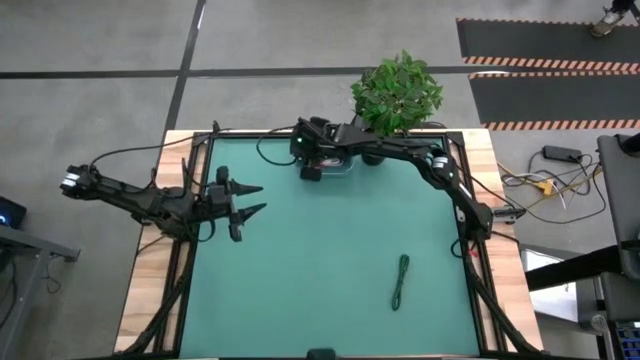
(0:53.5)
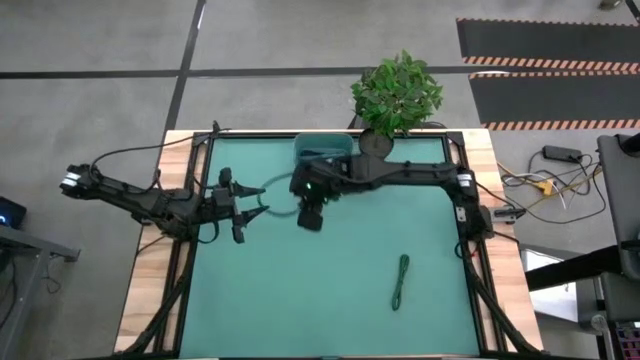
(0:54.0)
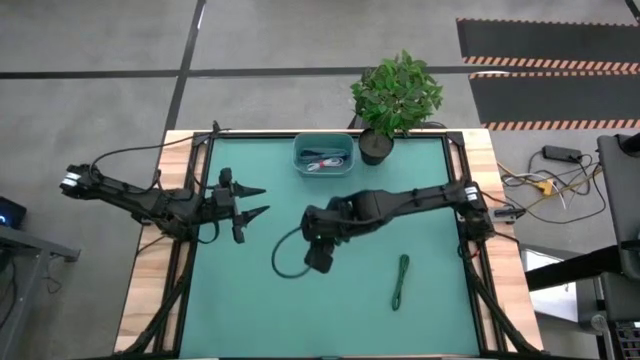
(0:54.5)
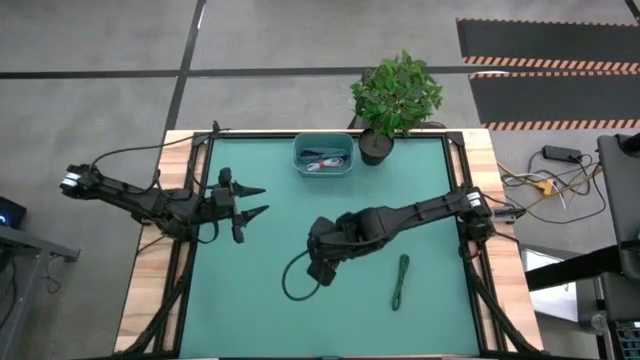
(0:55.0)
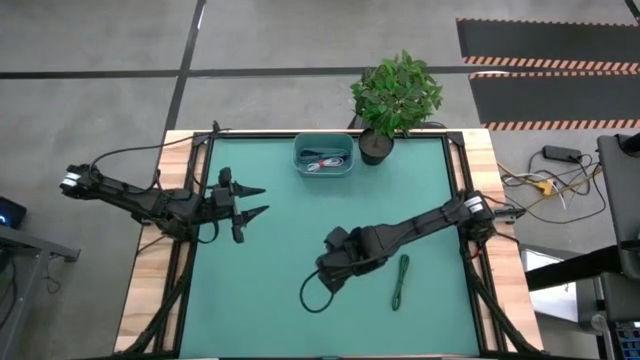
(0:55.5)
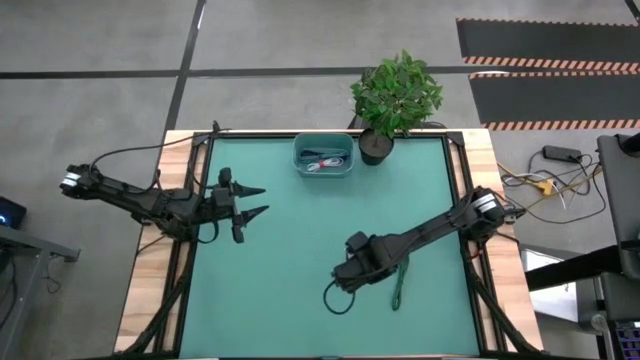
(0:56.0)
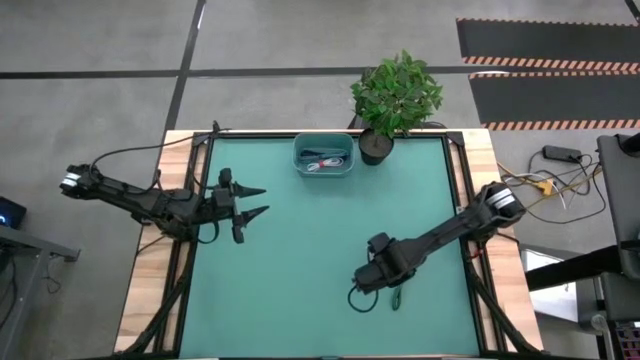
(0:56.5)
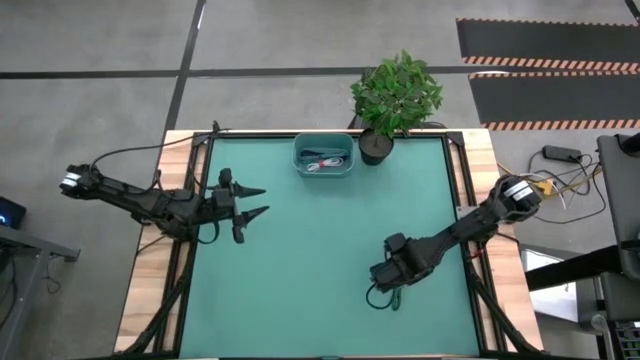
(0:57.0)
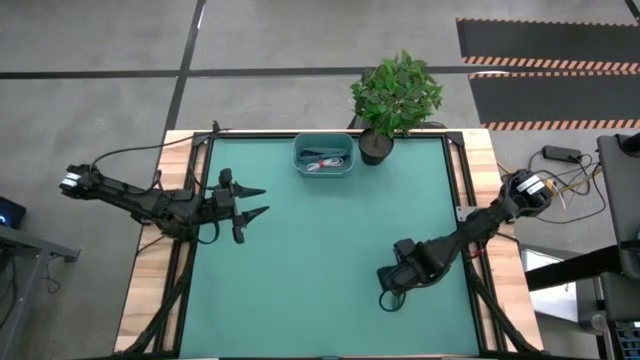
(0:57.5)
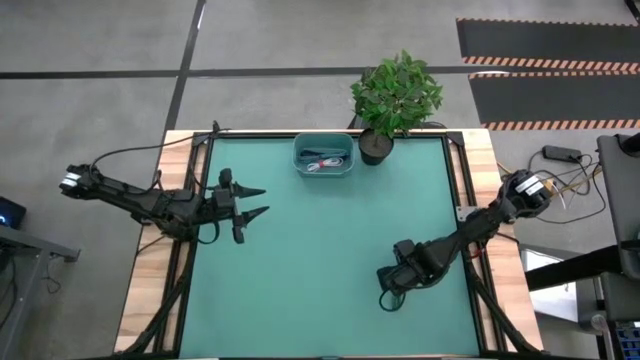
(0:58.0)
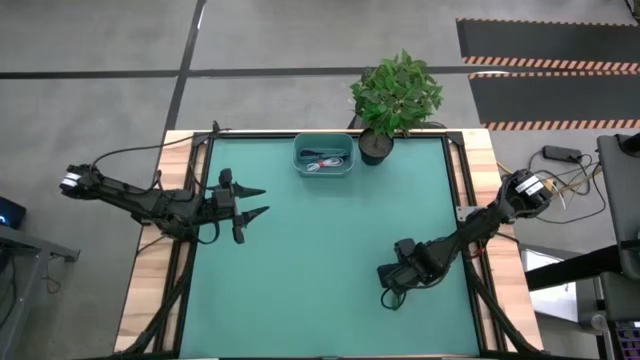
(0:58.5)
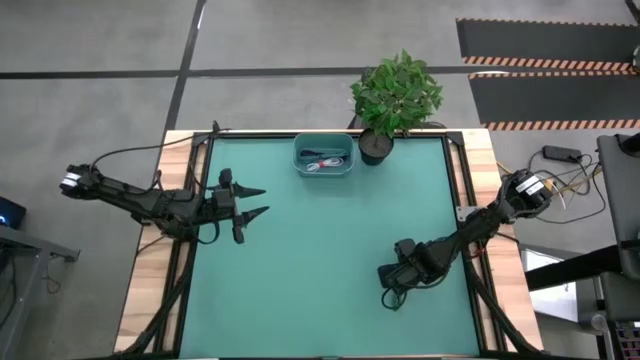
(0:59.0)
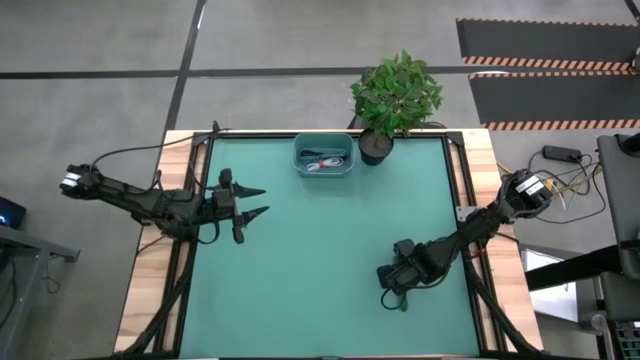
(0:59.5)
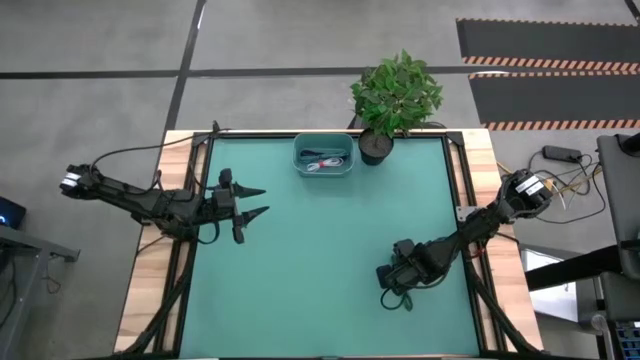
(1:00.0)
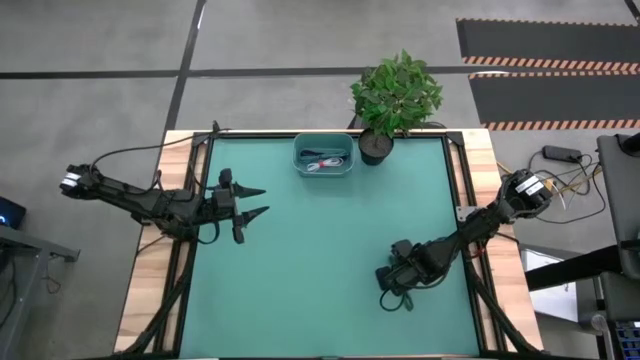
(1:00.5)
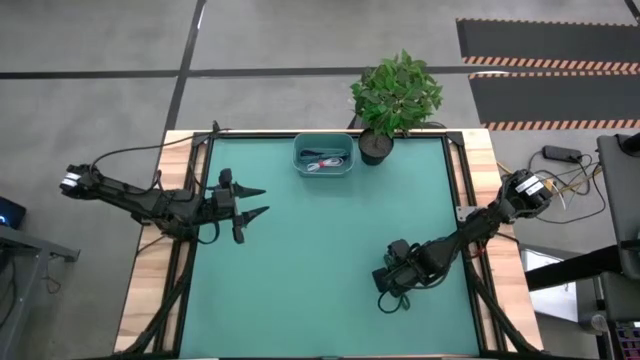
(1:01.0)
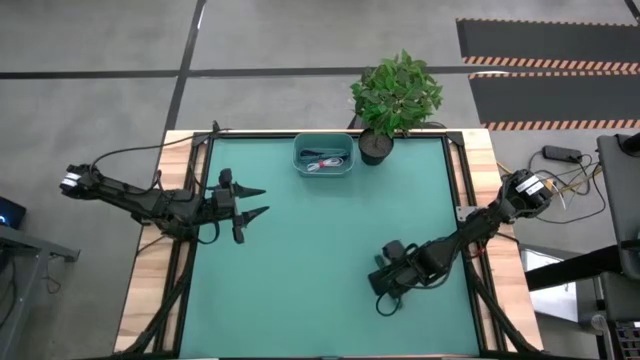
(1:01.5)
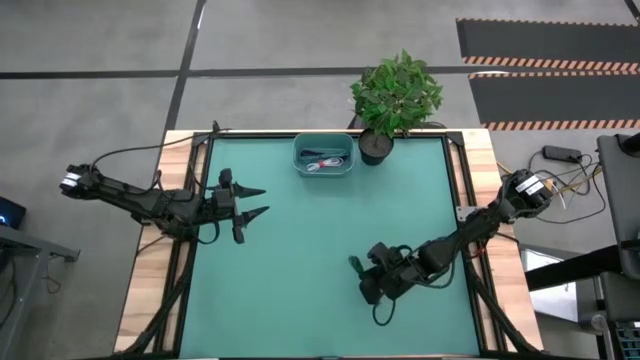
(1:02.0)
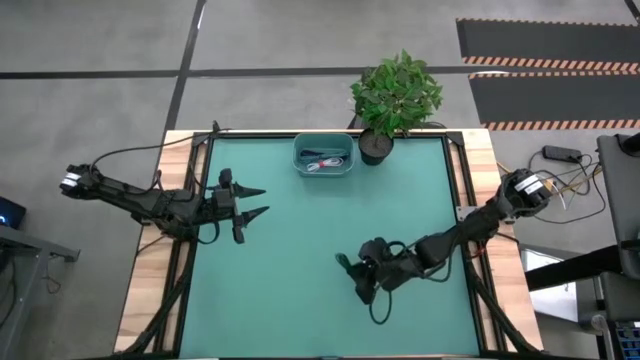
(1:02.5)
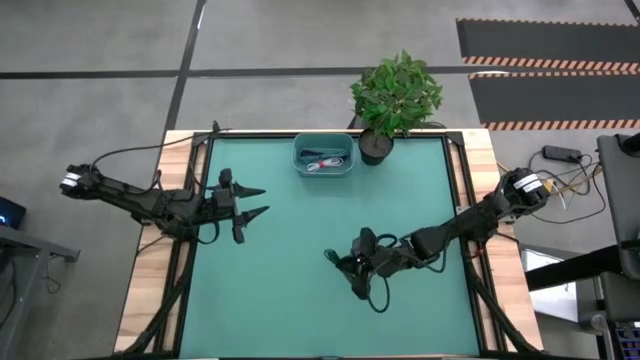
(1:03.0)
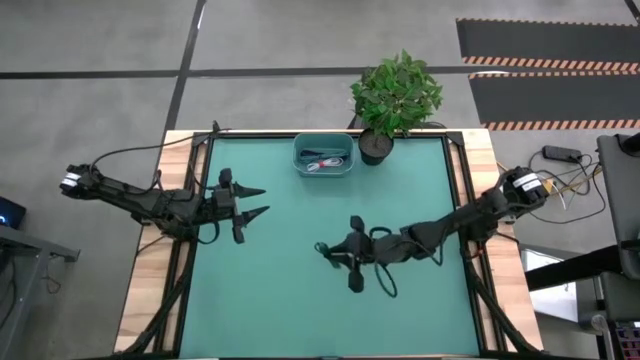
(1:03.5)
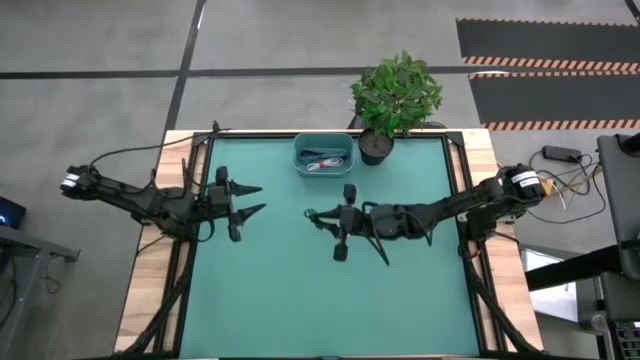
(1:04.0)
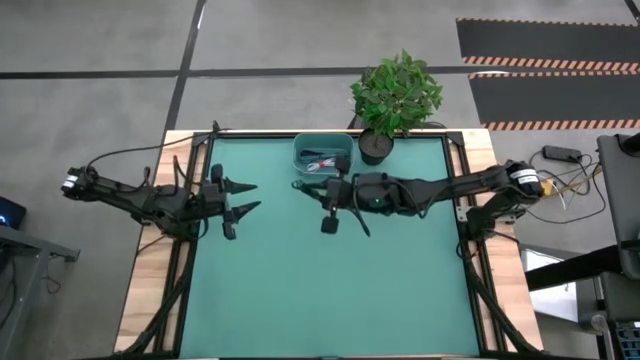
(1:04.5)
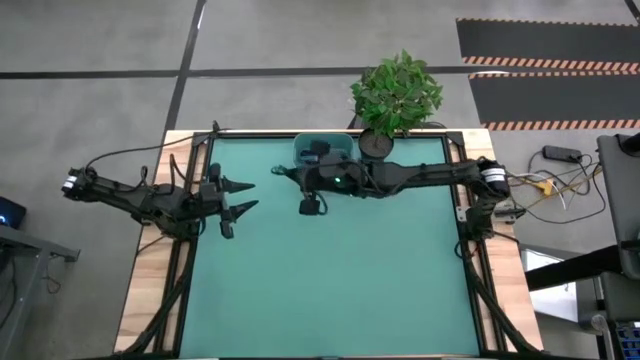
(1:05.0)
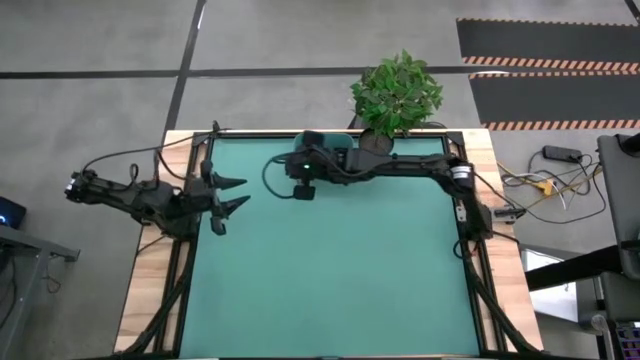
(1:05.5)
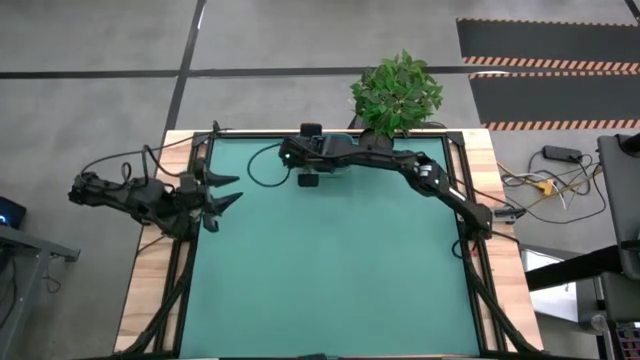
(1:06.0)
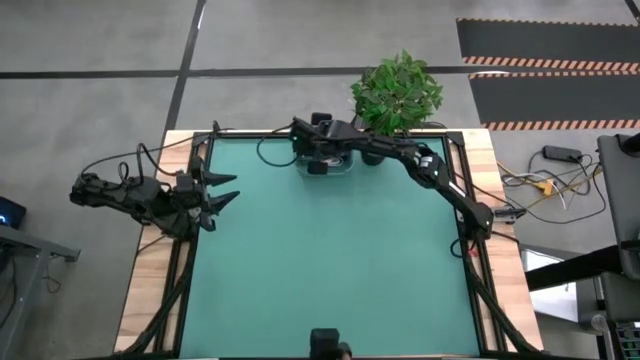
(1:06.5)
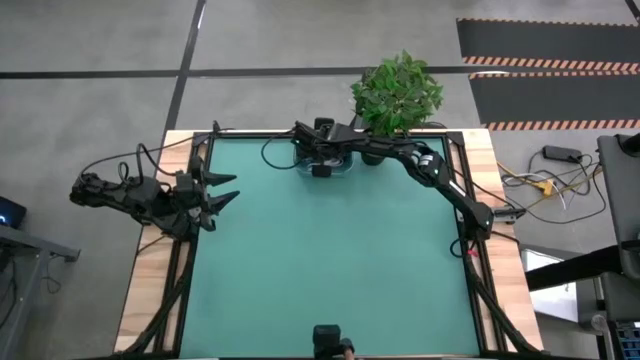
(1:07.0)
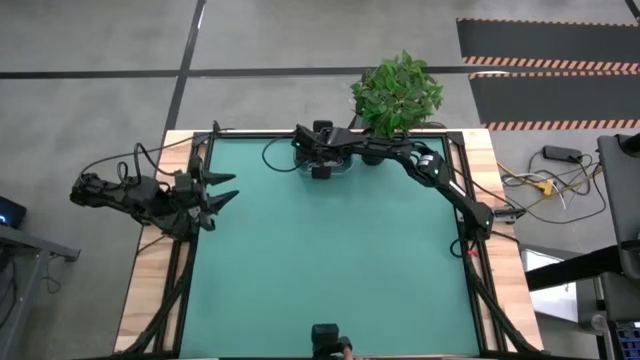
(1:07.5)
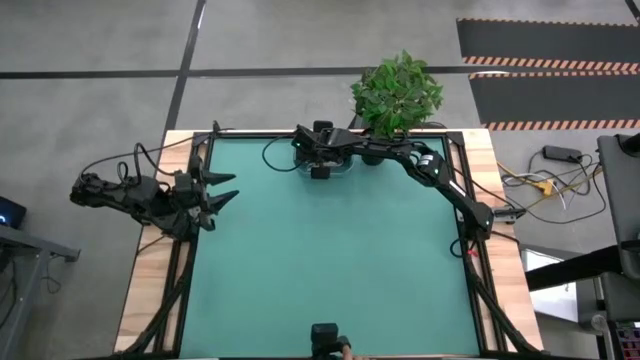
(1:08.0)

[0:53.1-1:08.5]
Task: Pick and place USB-C Cables
Put the green charger cable into the green bin

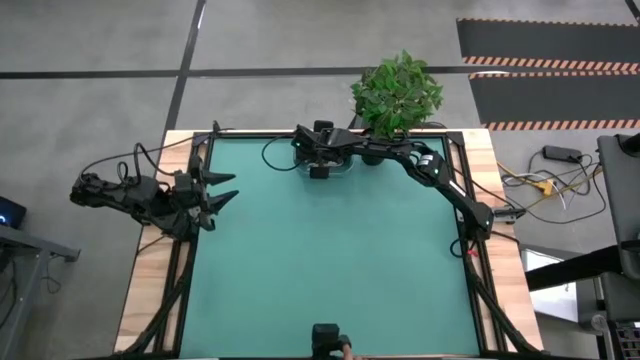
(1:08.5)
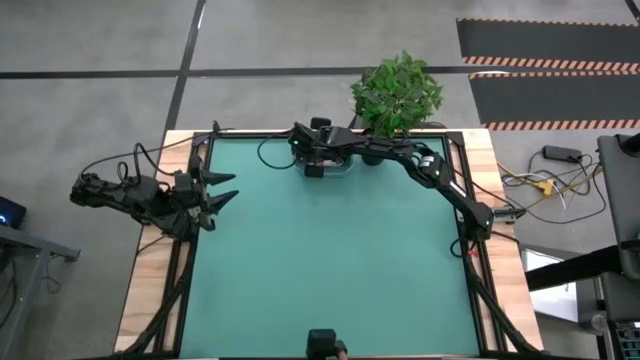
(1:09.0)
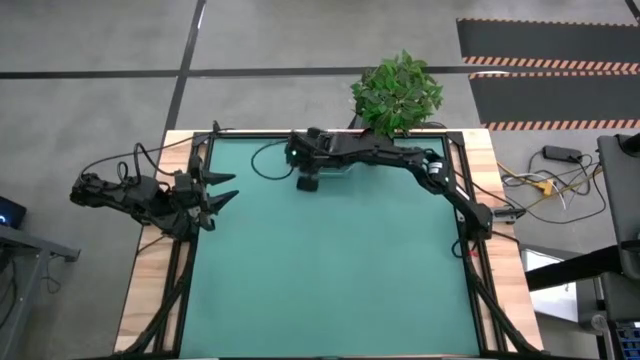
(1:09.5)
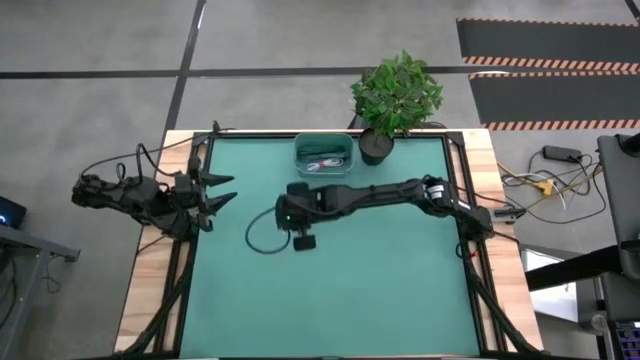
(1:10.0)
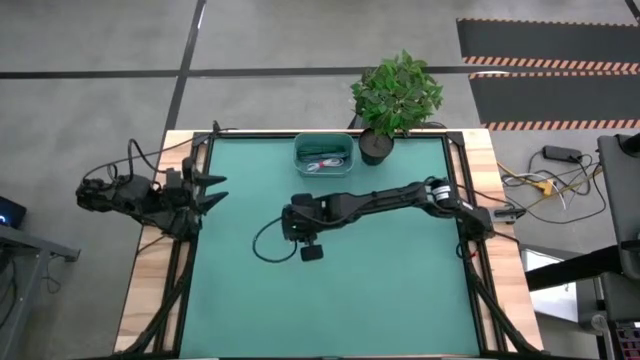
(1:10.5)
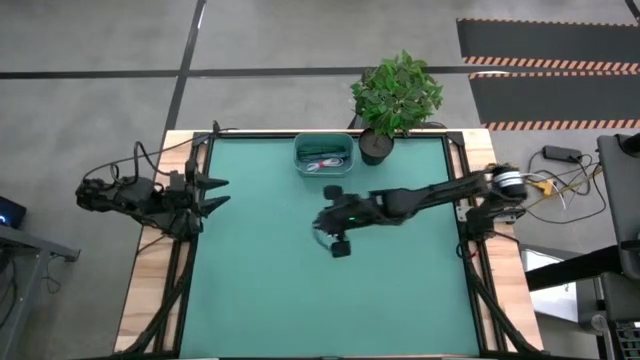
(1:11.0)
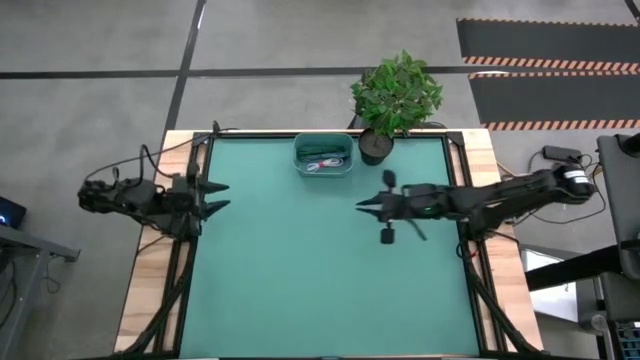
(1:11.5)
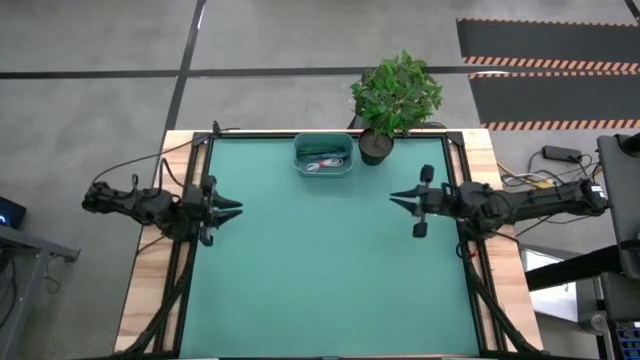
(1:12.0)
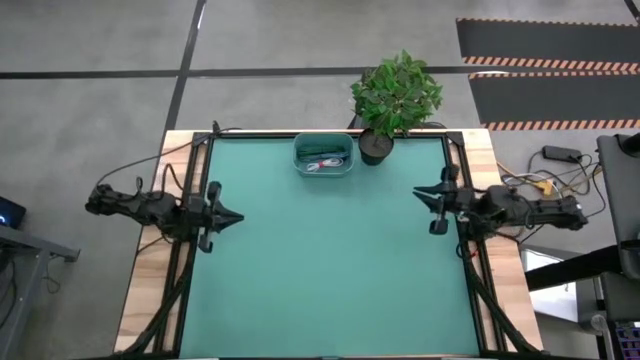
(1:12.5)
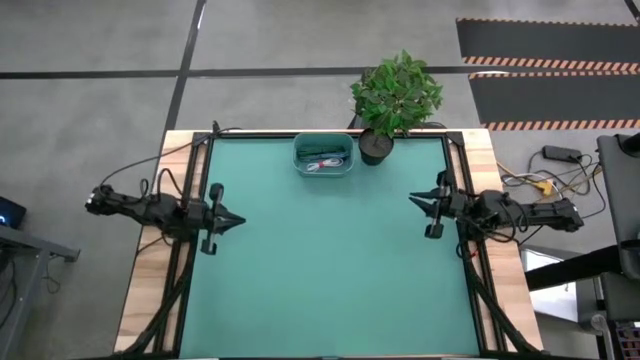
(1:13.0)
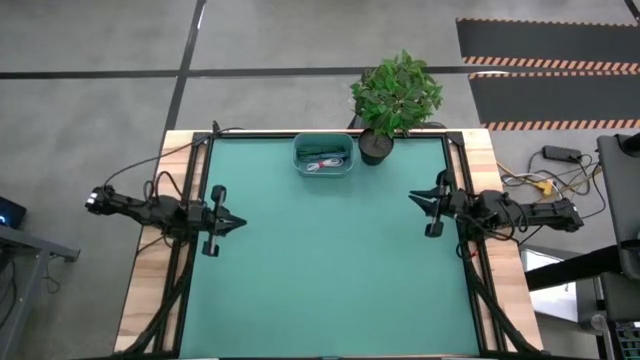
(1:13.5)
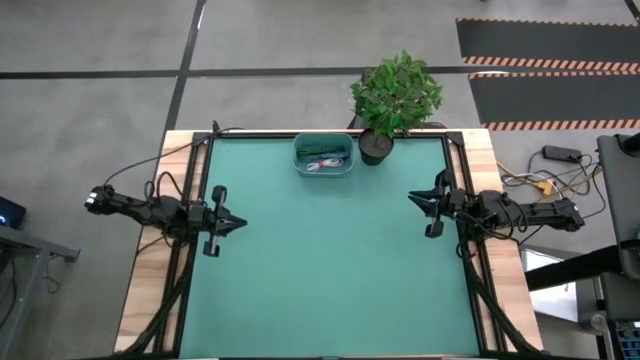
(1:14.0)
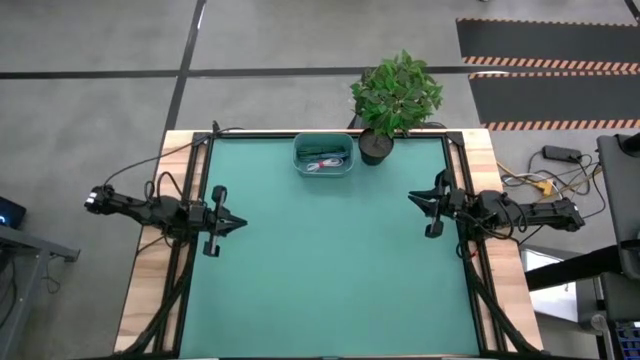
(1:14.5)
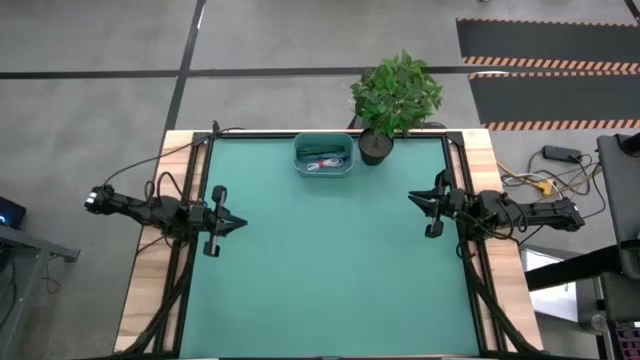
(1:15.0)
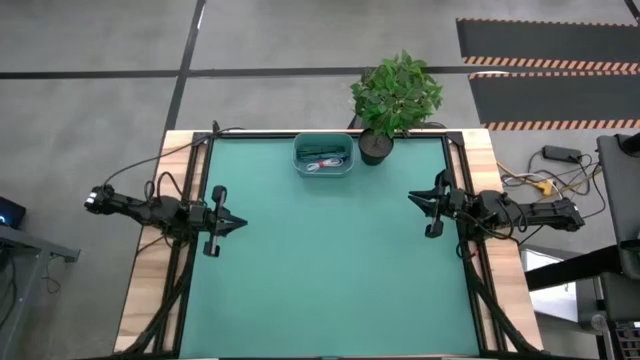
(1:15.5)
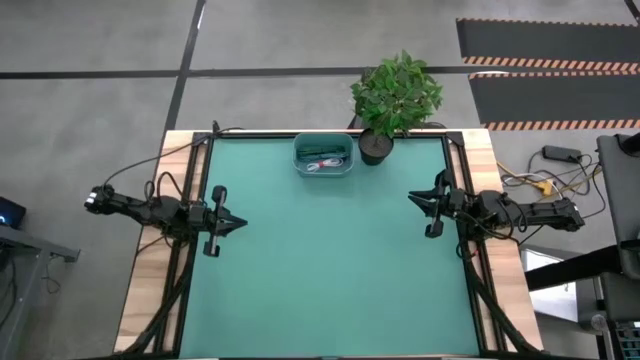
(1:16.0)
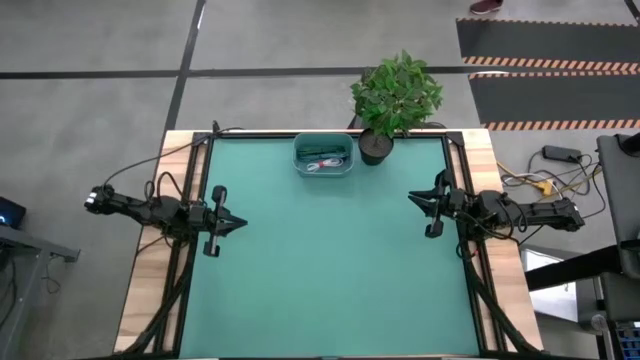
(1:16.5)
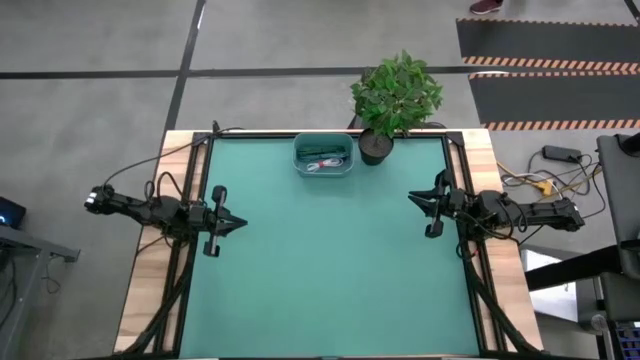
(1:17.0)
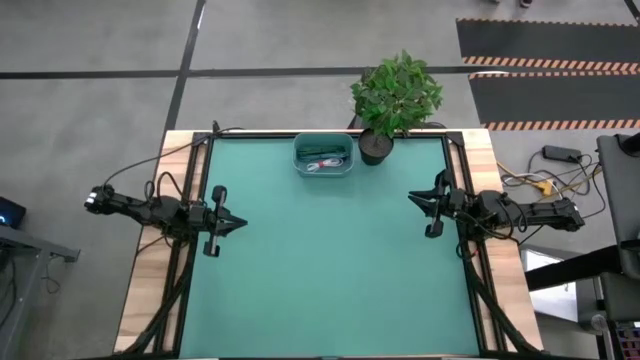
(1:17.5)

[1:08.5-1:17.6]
Return to Home Position
